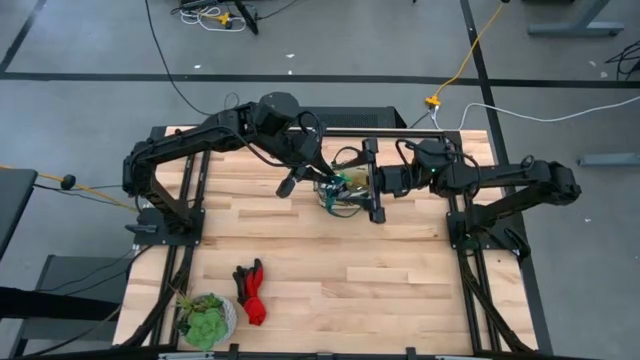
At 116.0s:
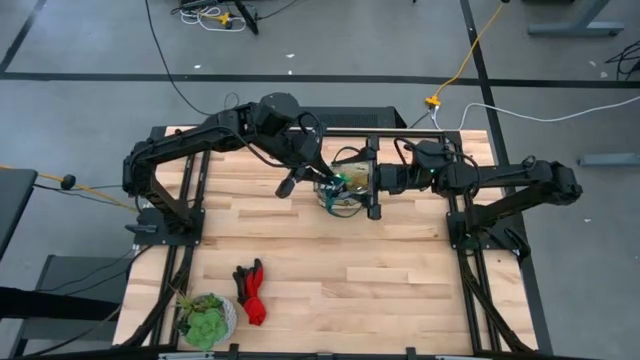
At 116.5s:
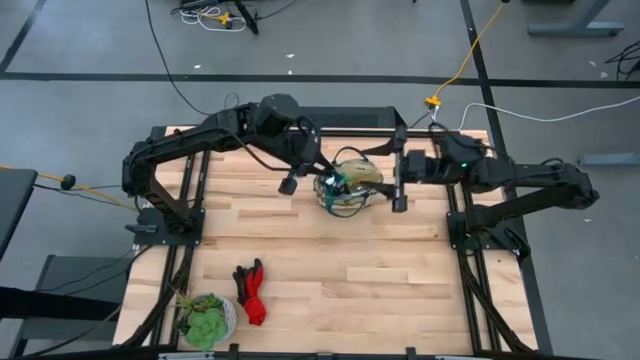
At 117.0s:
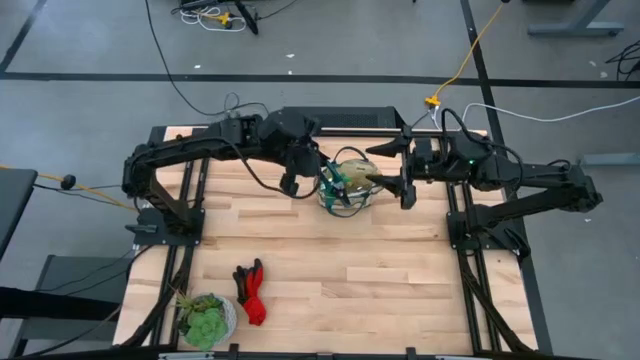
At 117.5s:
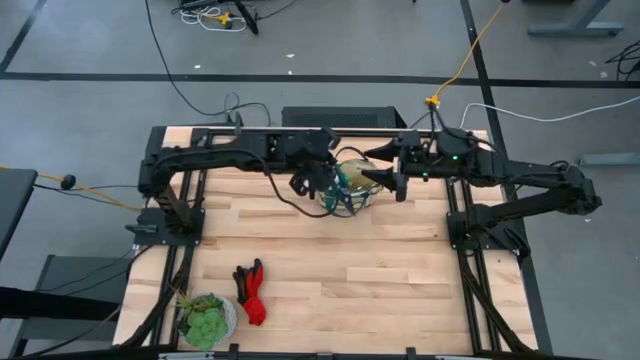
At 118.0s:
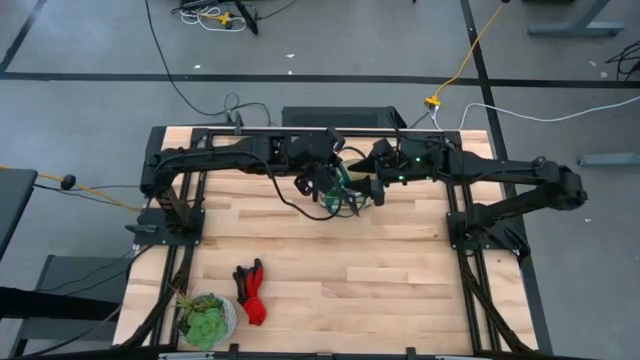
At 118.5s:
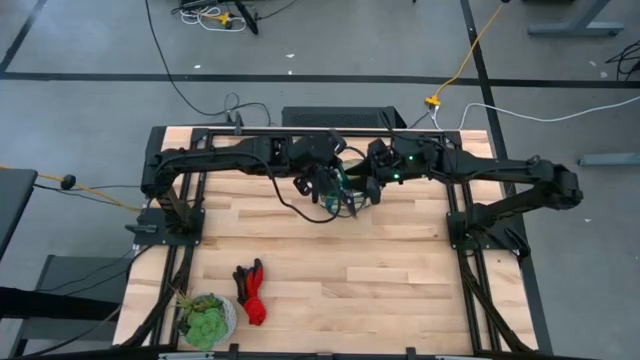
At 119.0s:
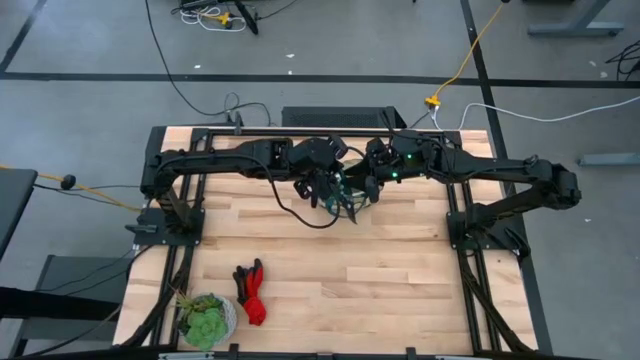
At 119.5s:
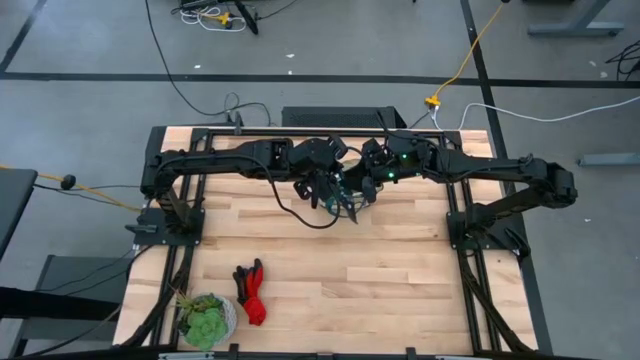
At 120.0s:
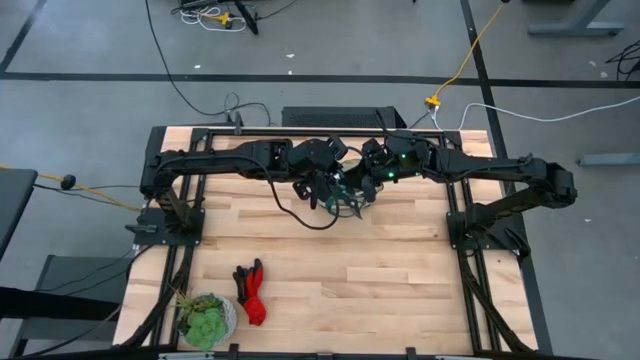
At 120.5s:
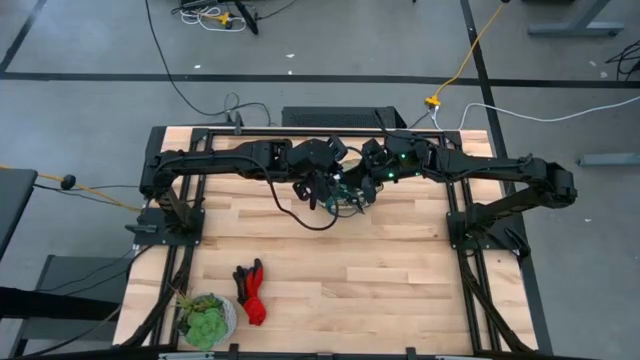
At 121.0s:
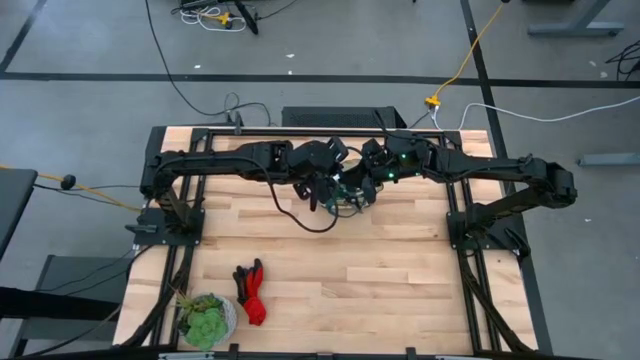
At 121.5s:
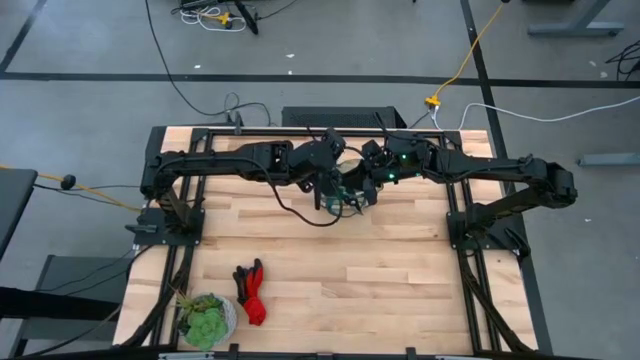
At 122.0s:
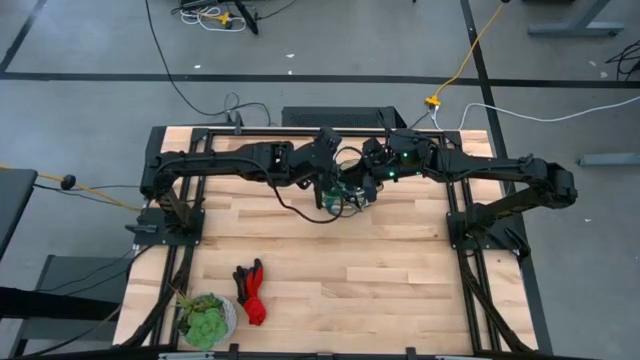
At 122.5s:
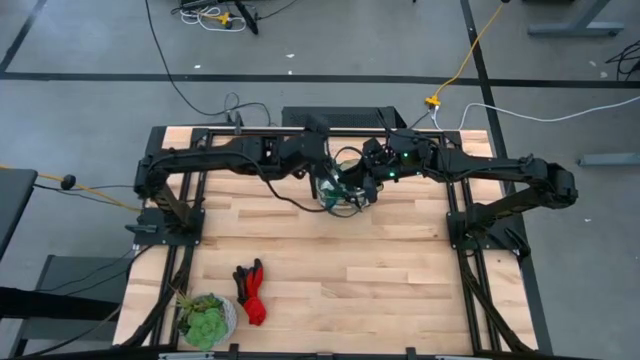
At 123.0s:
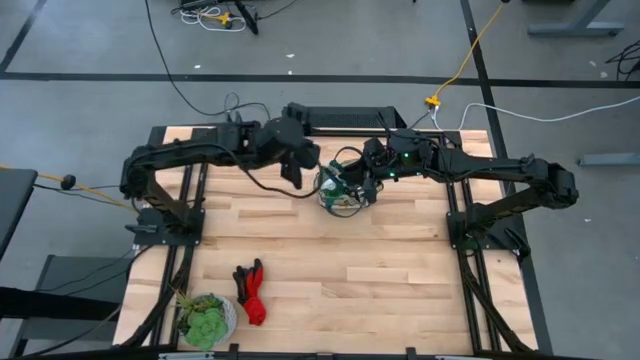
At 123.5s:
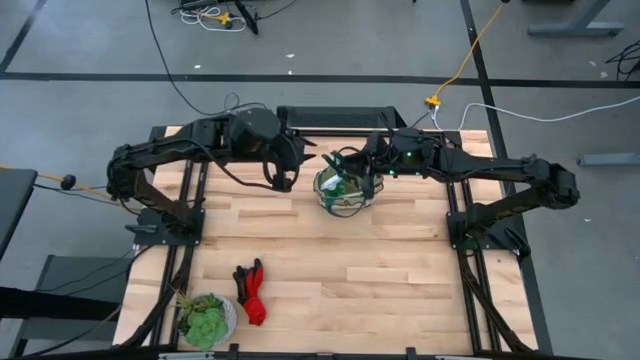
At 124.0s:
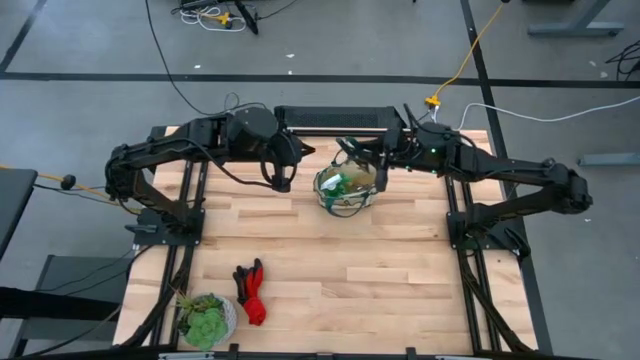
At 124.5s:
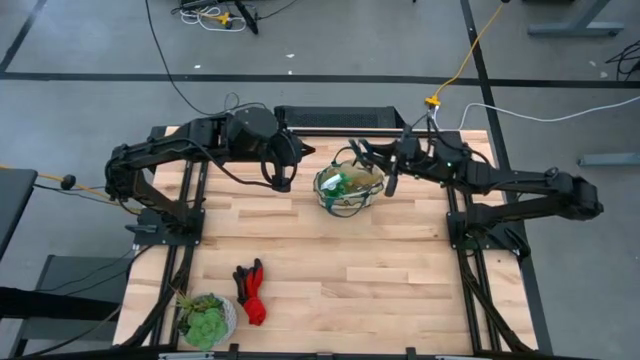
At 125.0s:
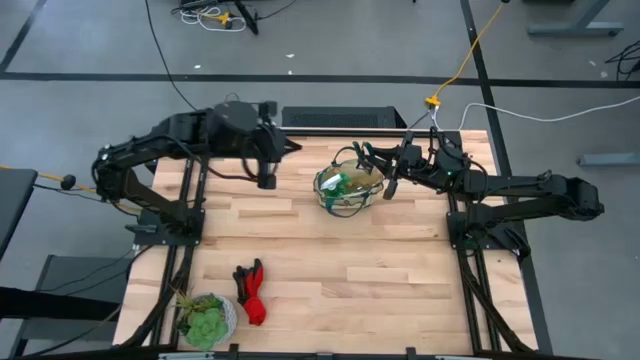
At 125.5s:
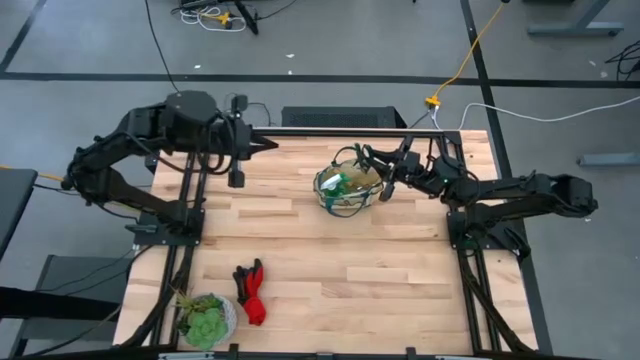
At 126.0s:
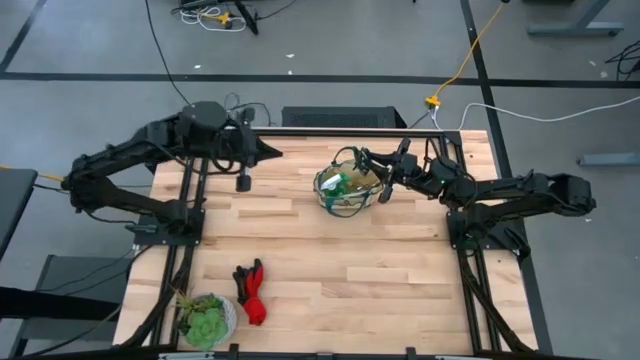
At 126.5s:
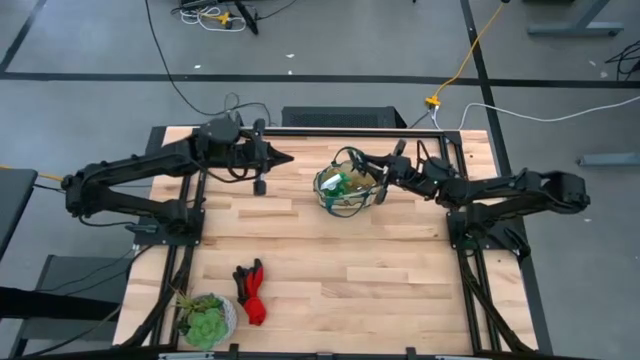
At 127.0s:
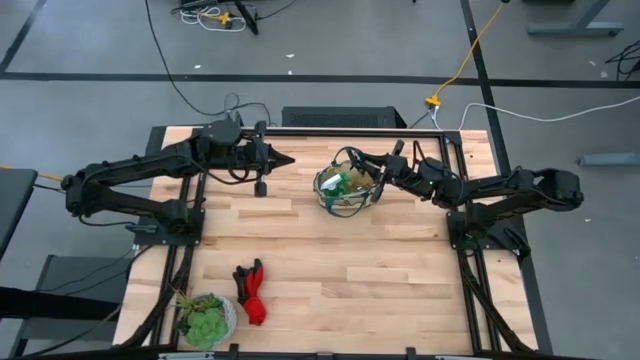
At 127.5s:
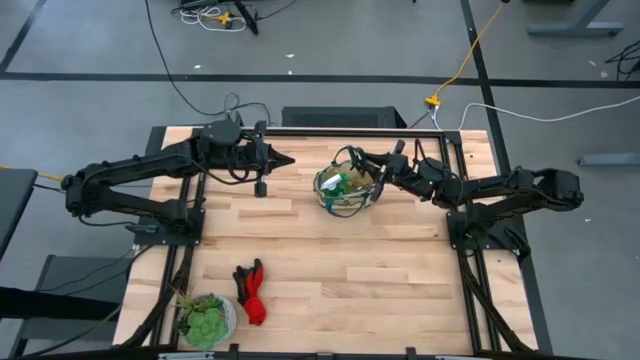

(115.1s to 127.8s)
Task: Pick & Place Garden tools in Gardening bag
Put the green shear scissors into the gardening bag

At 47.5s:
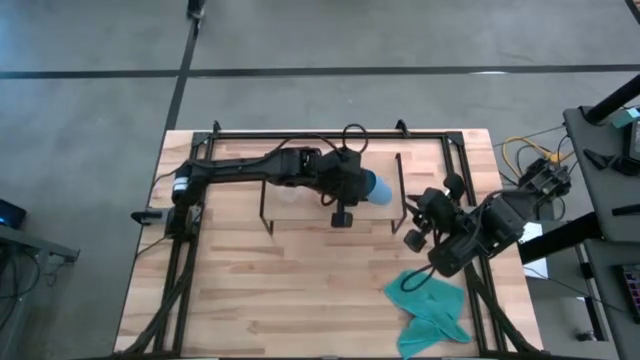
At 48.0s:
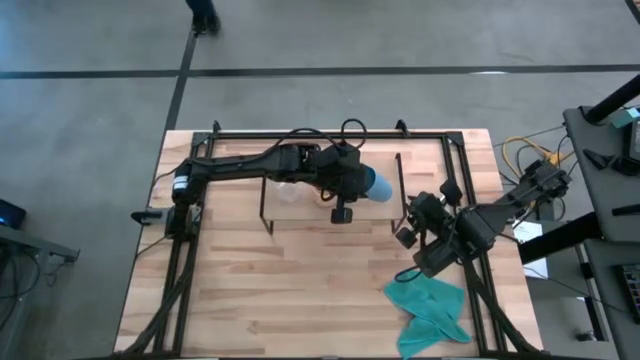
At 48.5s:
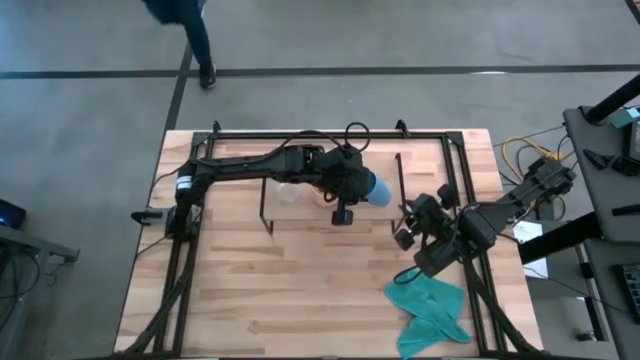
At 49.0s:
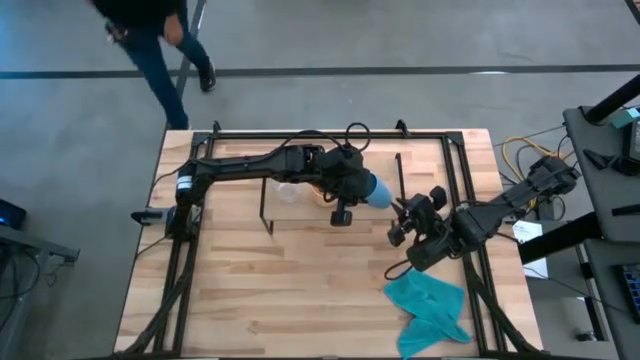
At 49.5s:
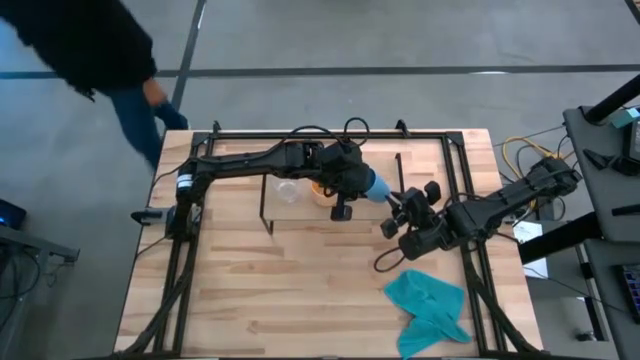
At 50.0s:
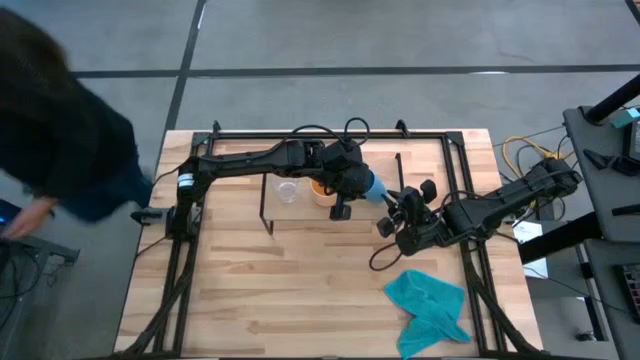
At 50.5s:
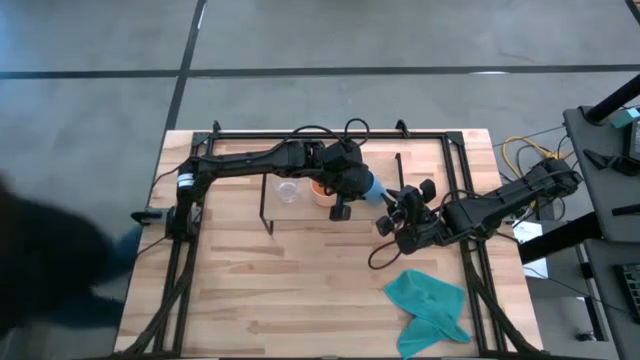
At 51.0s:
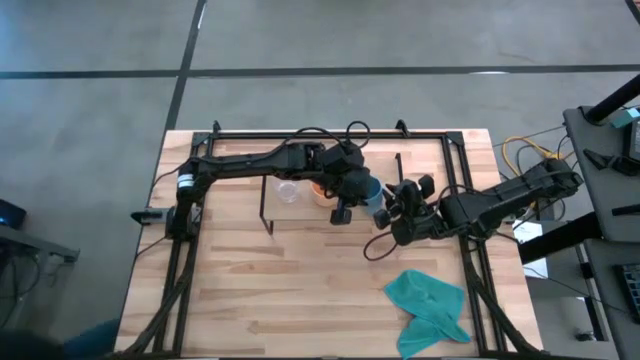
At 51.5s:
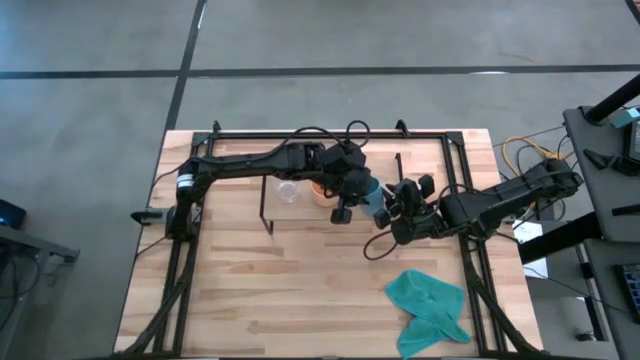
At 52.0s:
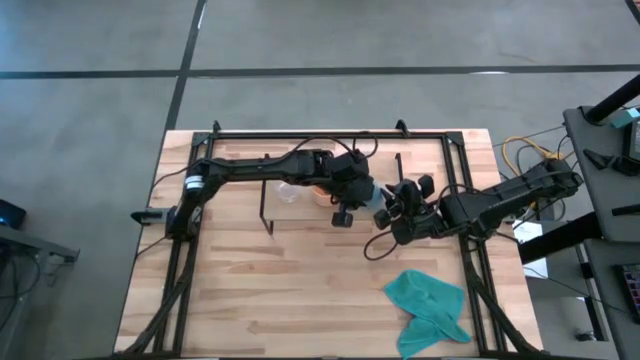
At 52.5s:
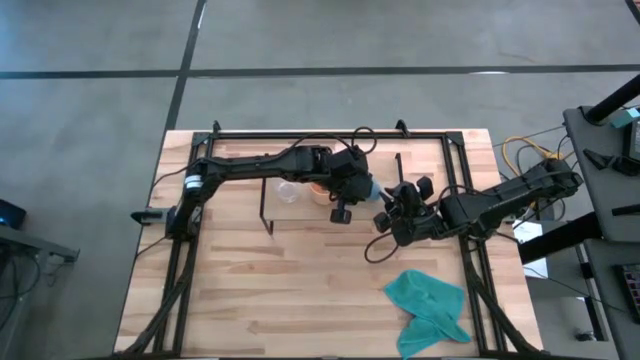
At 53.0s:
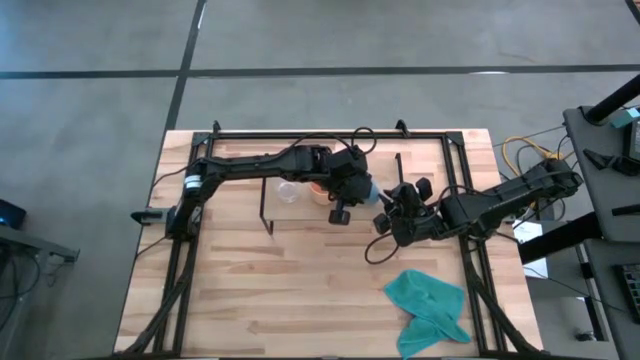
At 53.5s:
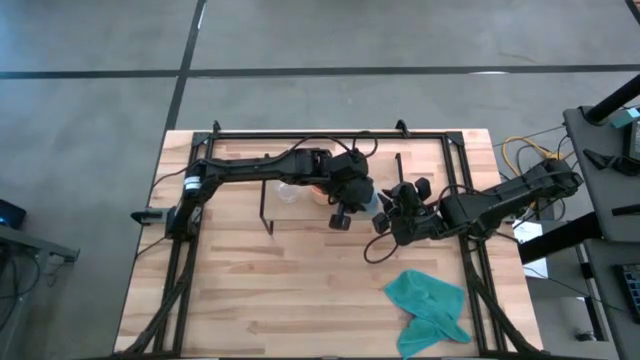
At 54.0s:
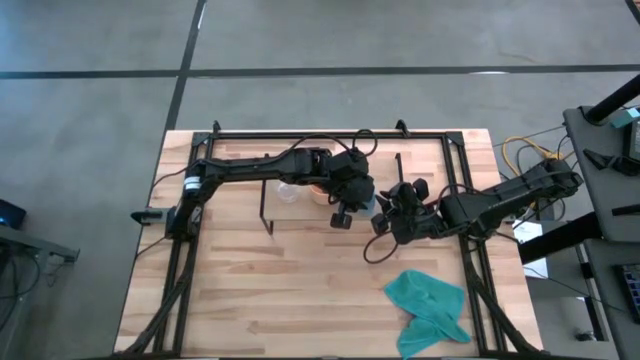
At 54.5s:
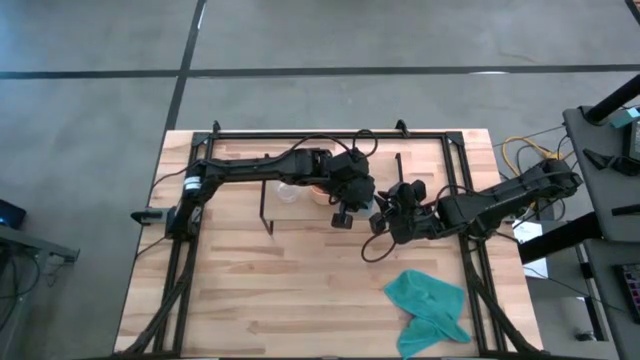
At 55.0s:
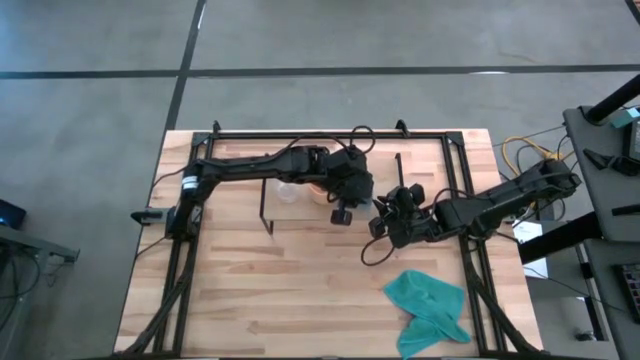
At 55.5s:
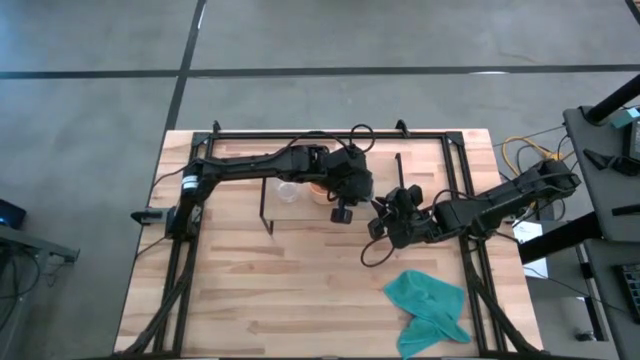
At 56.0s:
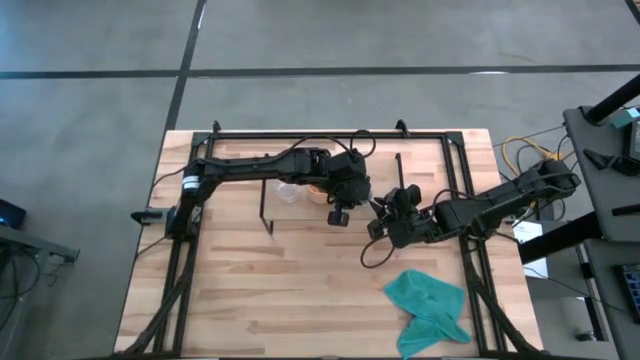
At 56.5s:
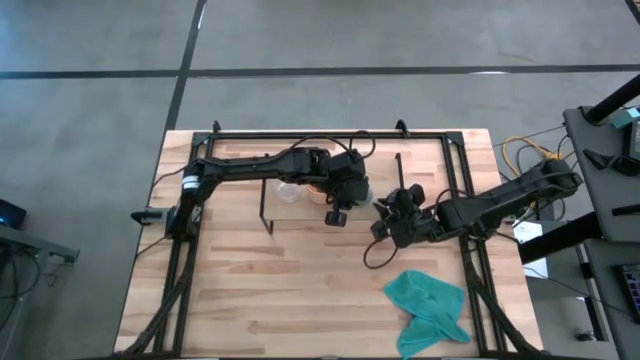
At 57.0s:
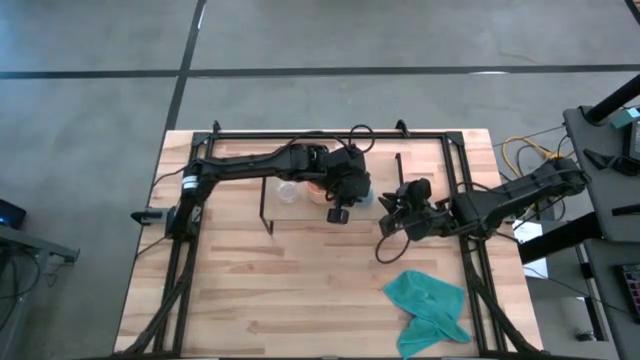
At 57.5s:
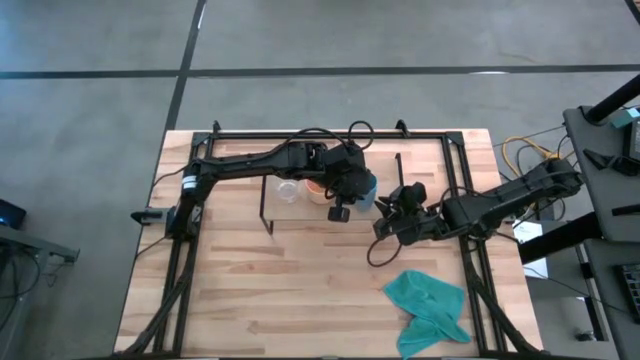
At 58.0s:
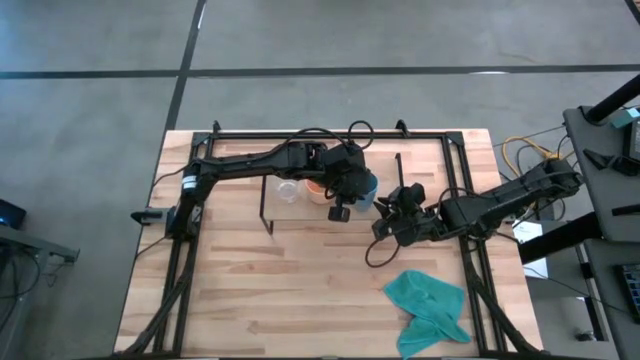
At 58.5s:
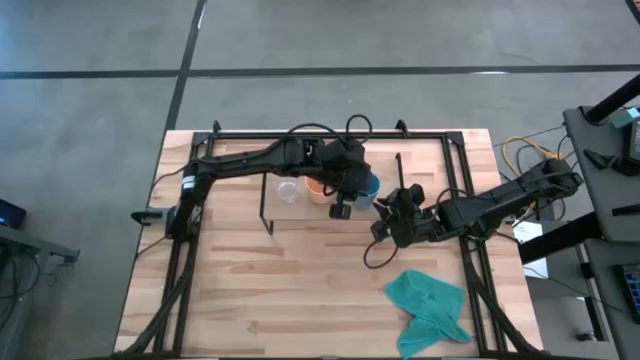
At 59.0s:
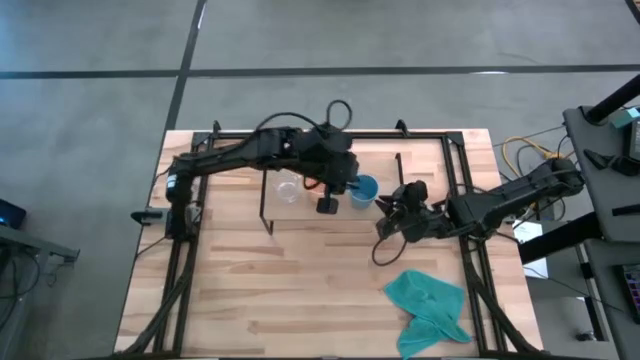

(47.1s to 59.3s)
Task: Stack small to large cups/mugs on shelf
Put the blue cup on the shelf
